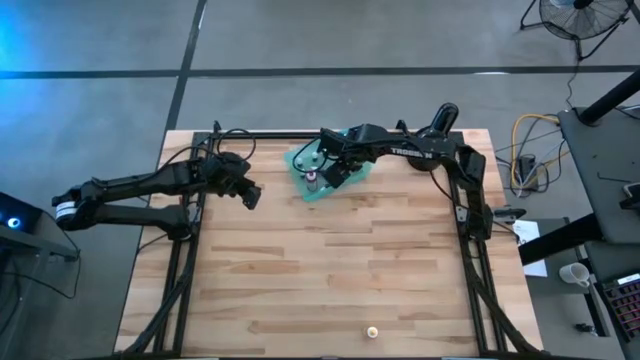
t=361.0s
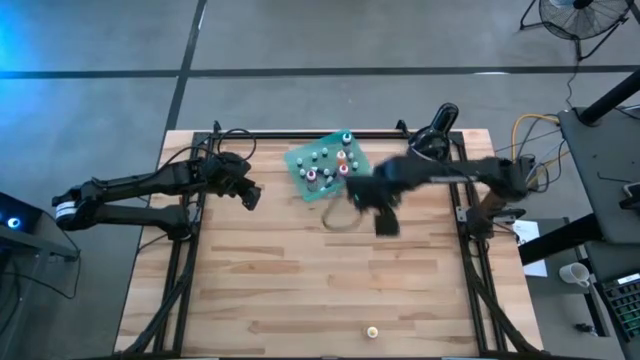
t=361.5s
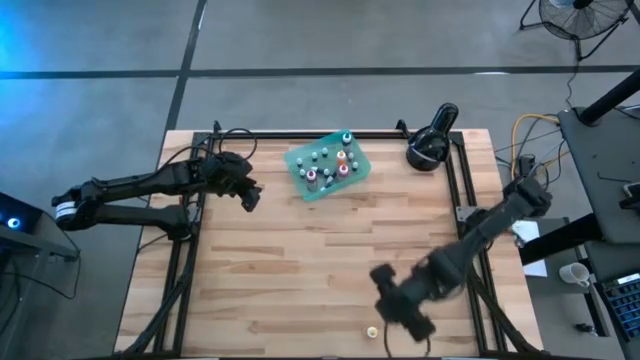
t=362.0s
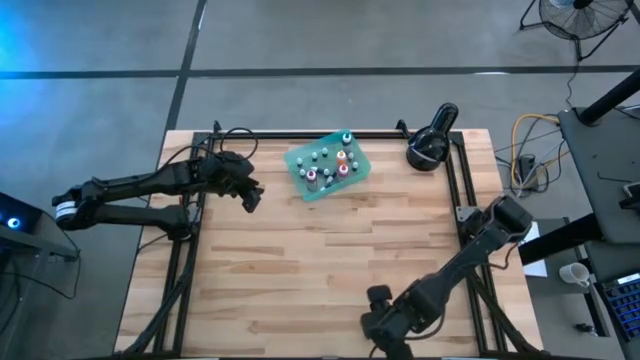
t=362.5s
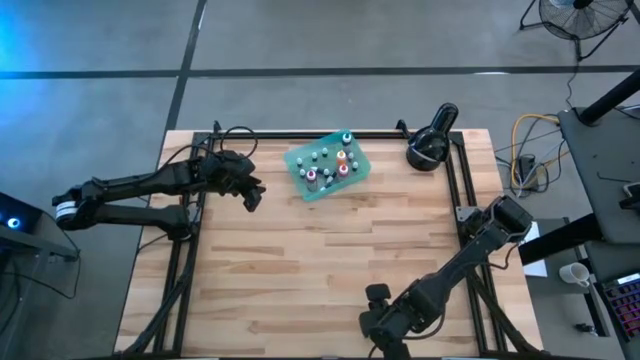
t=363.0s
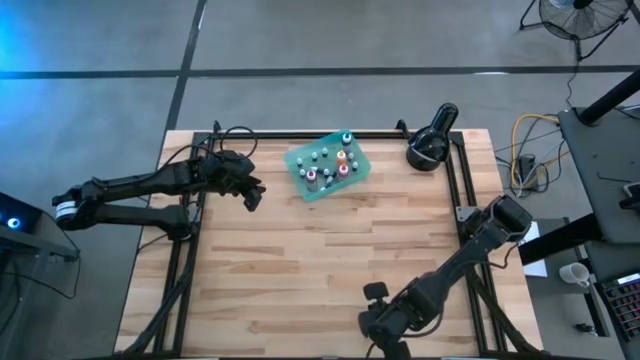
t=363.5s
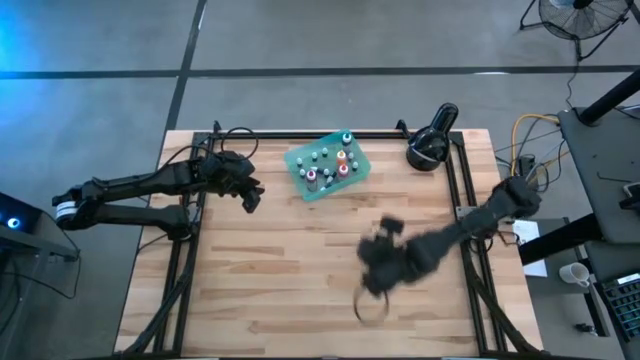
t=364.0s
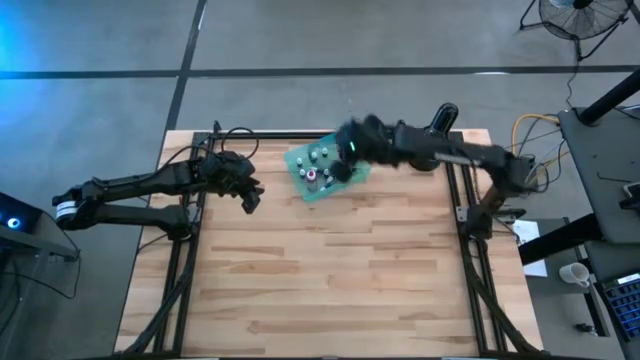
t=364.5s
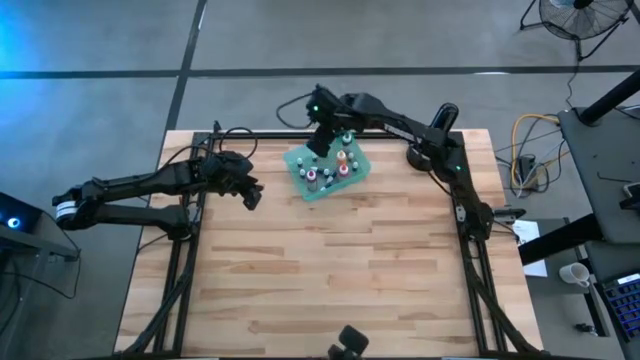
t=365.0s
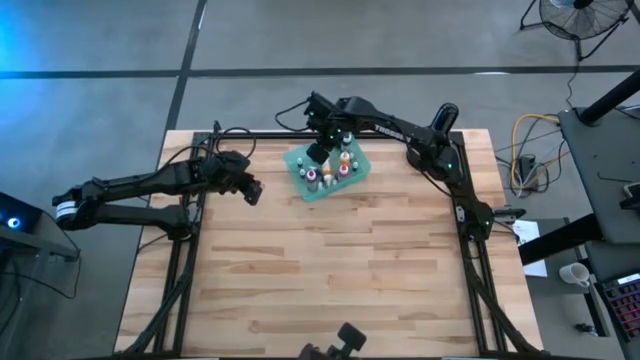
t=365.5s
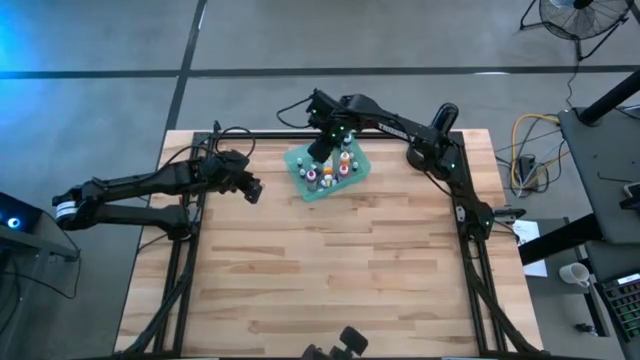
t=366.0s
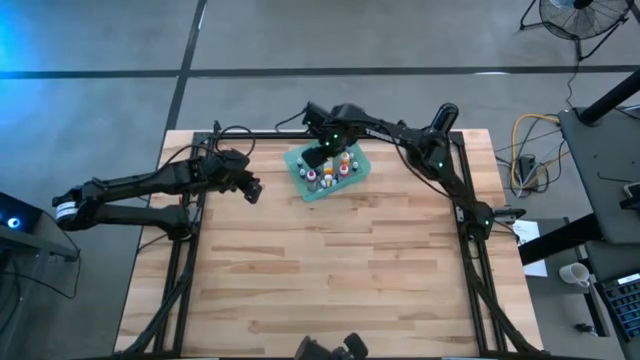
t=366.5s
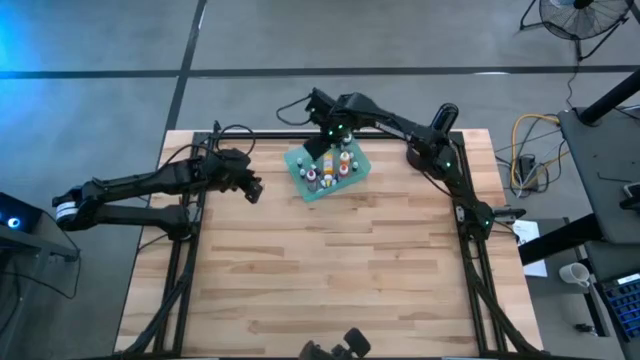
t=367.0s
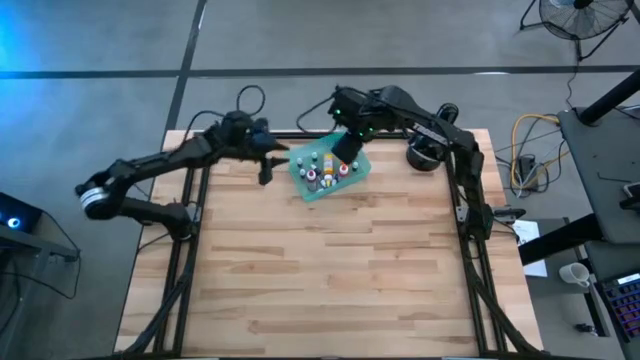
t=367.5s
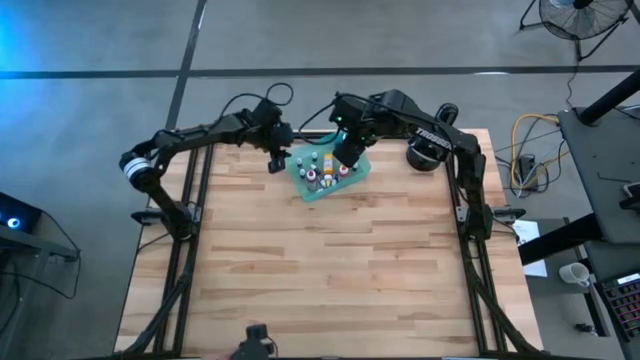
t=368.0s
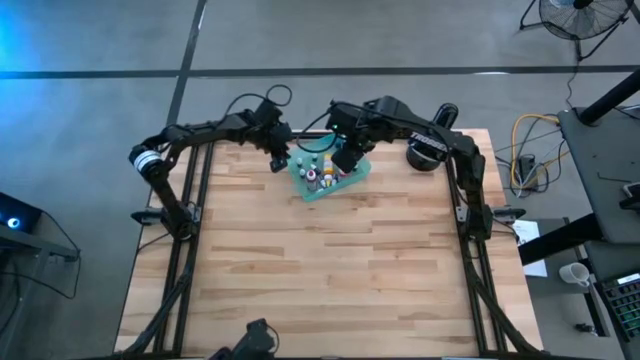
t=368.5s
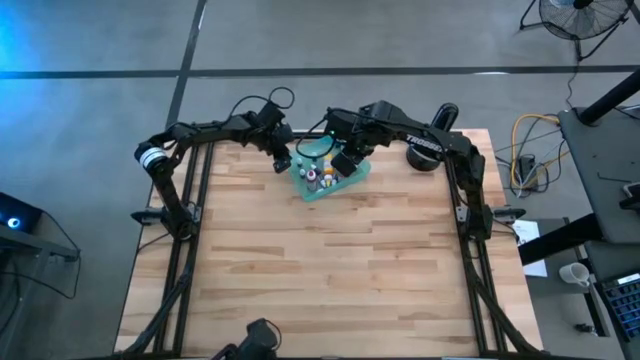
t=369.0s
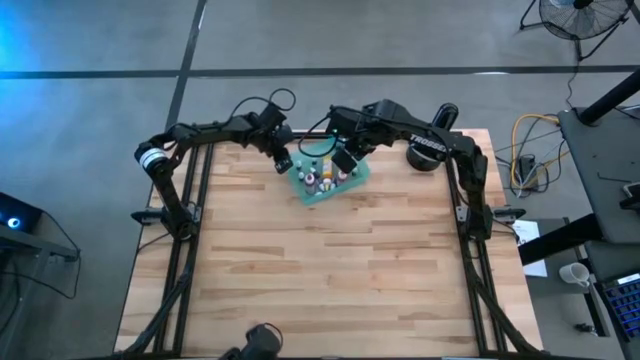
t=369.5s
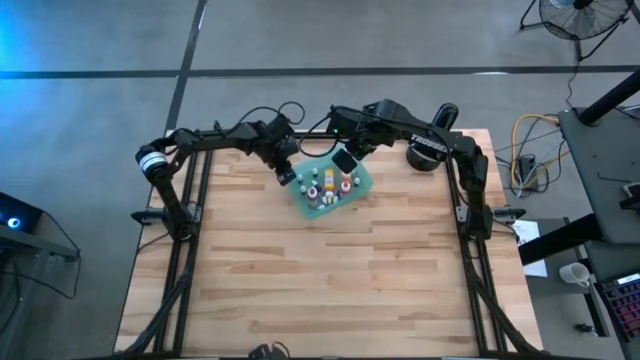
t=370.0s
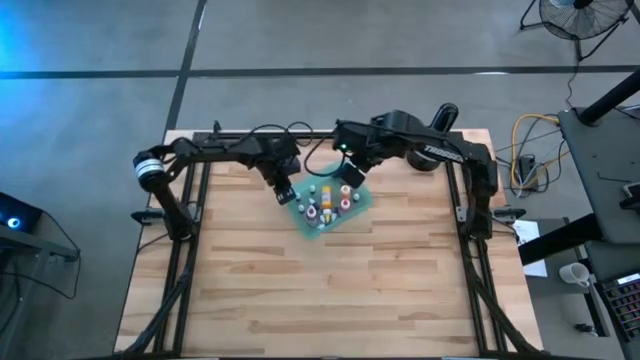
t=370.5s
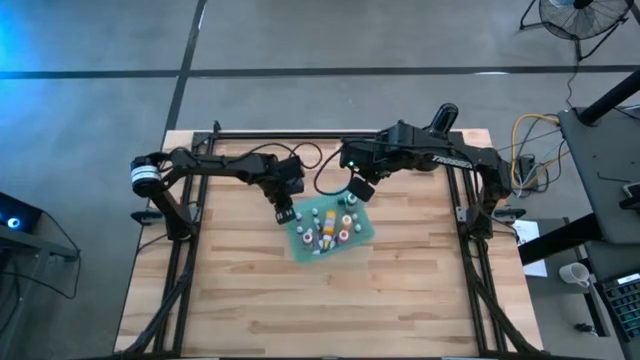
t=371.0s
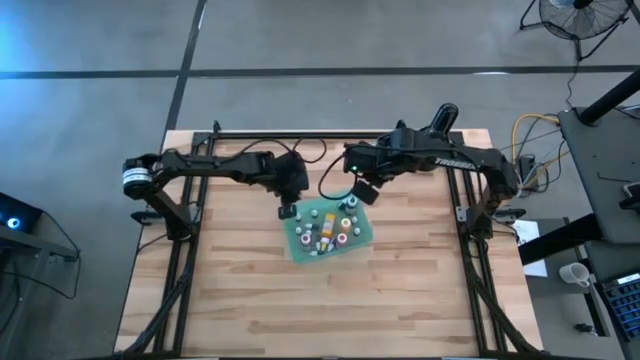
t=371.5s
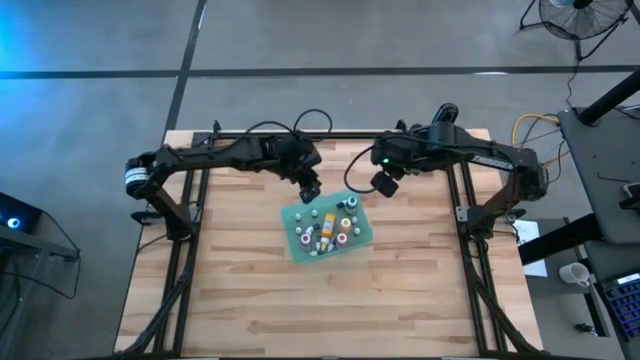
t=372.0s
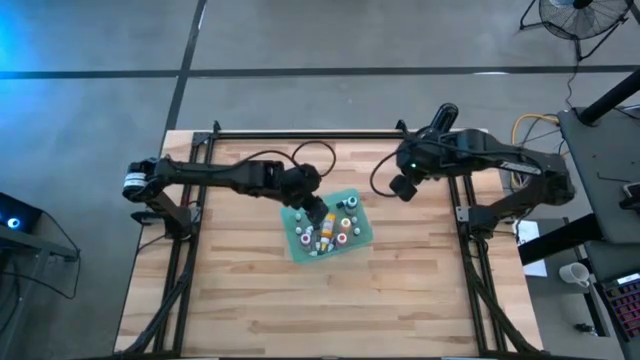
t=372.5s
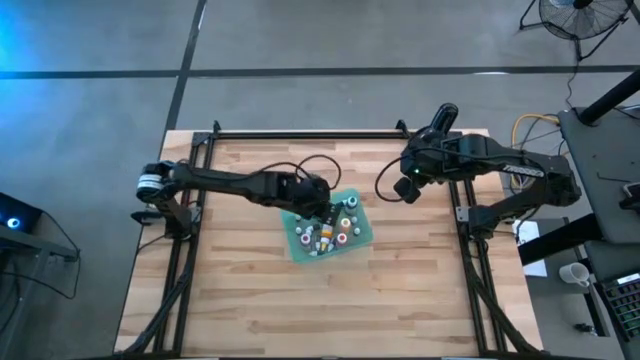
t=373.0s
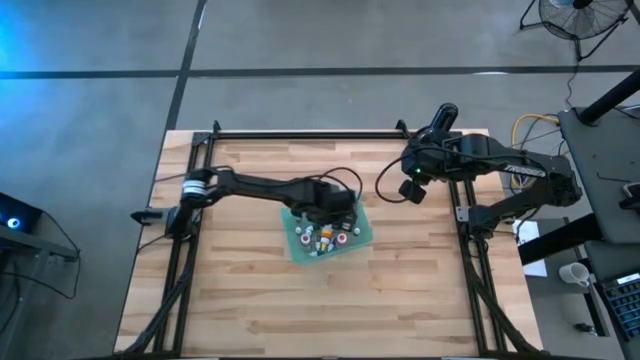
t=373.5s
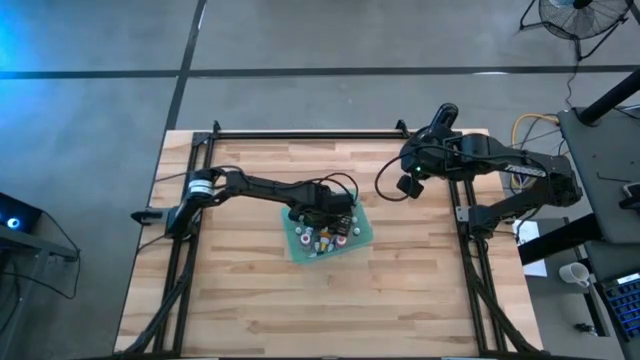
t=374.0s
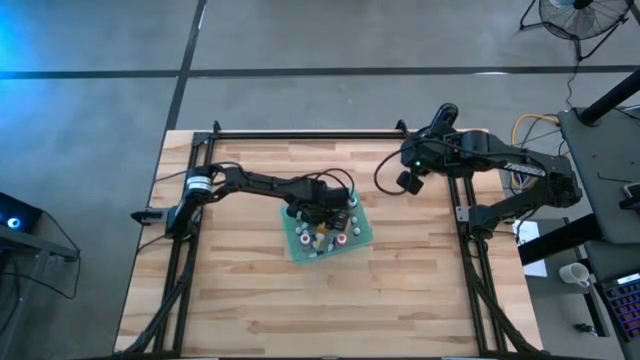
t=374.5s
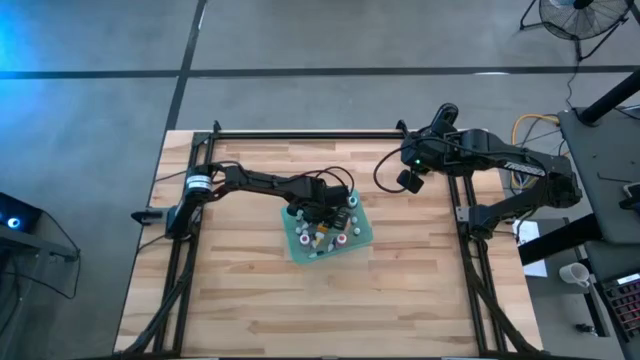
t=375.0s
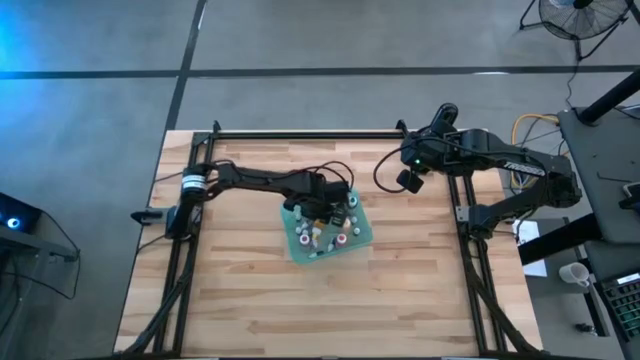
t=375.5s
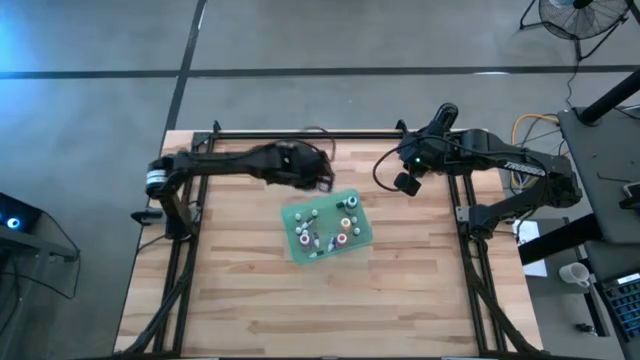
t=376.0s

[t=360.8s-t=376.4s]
Task: Pick & Place food coloring
Put the orange big food coloring into the green bin

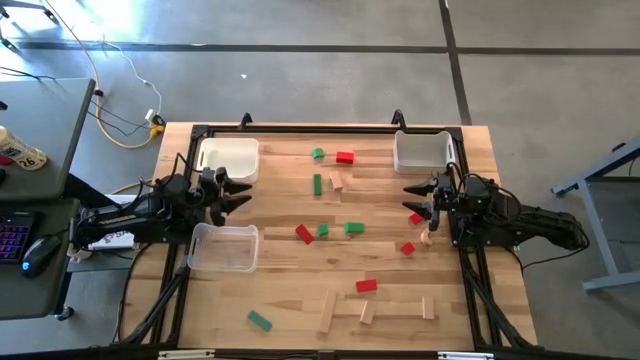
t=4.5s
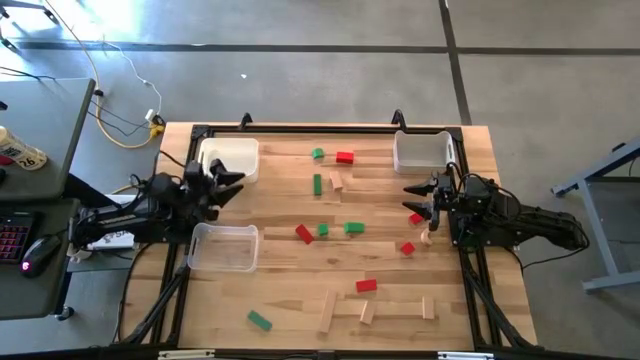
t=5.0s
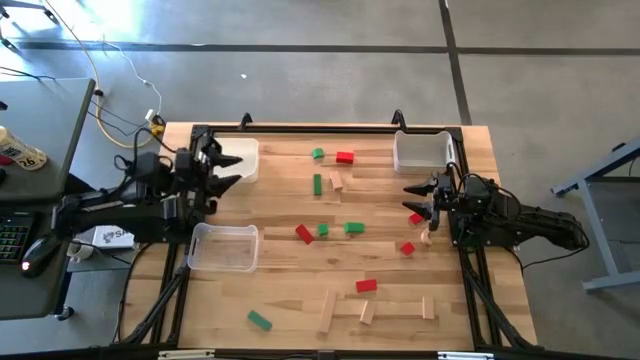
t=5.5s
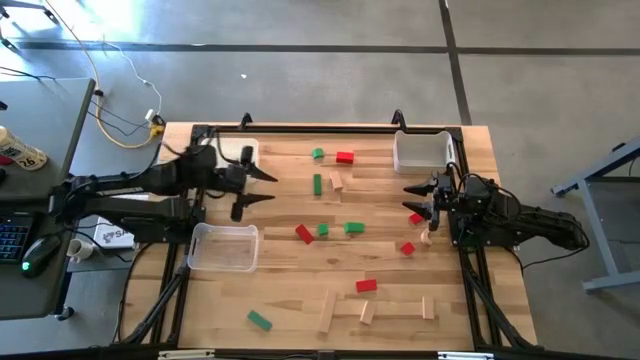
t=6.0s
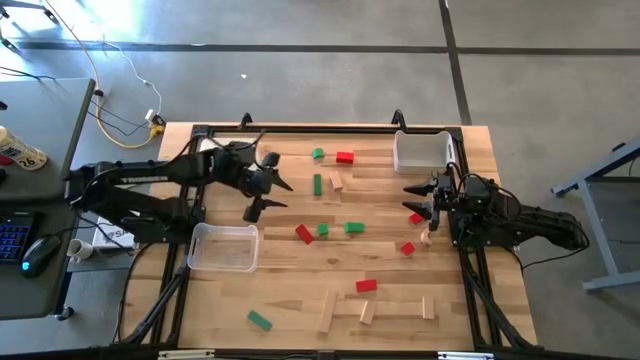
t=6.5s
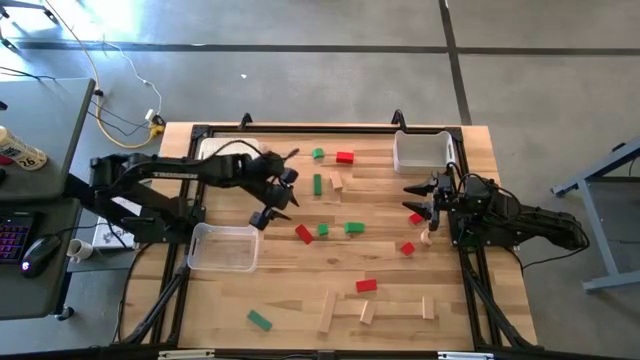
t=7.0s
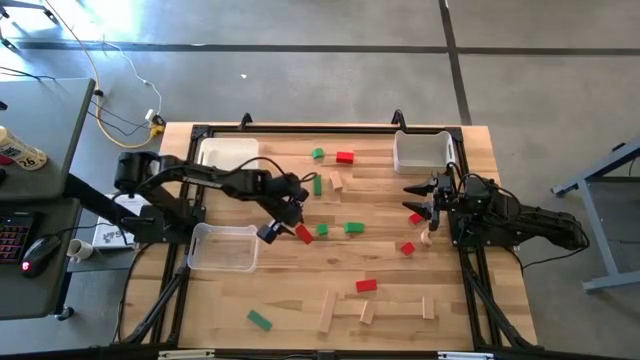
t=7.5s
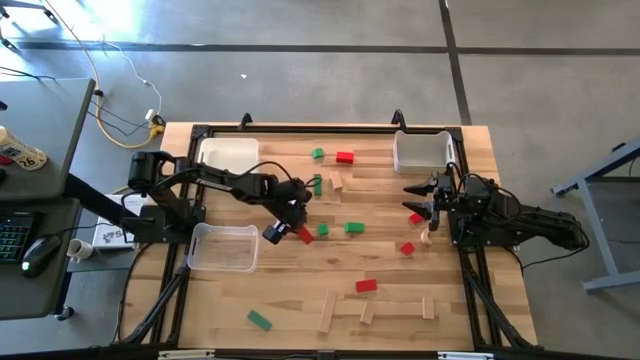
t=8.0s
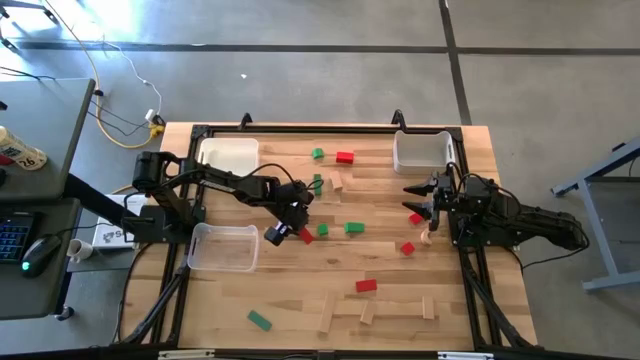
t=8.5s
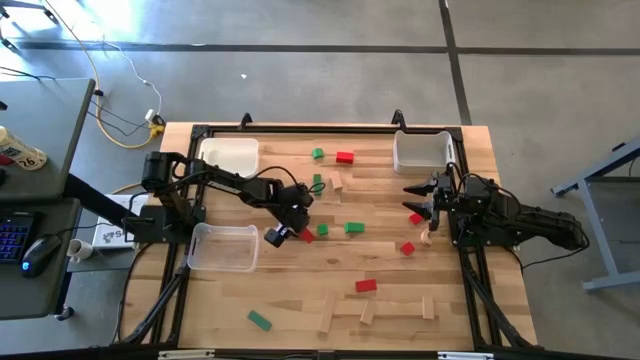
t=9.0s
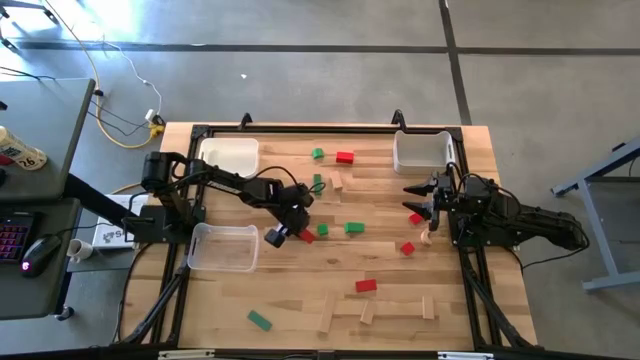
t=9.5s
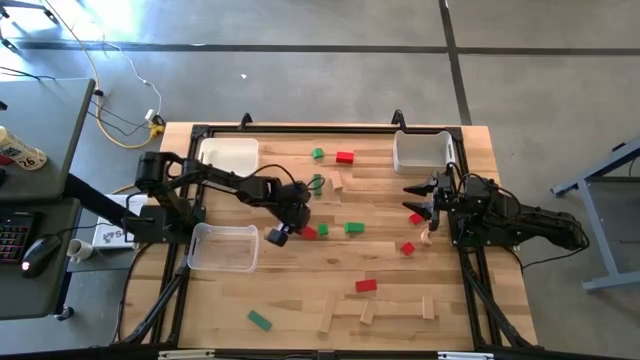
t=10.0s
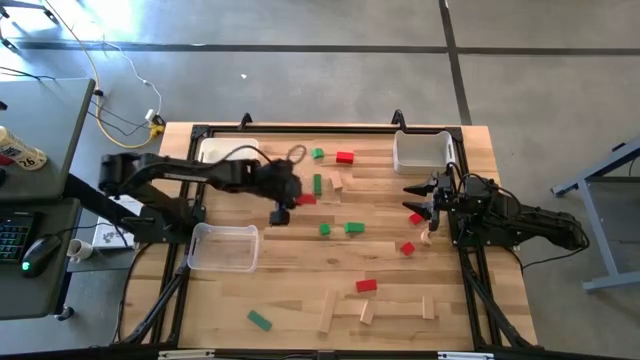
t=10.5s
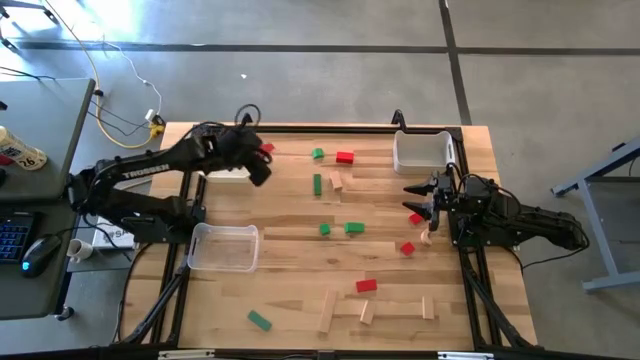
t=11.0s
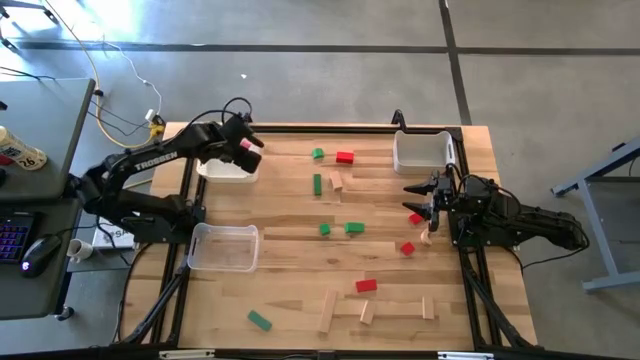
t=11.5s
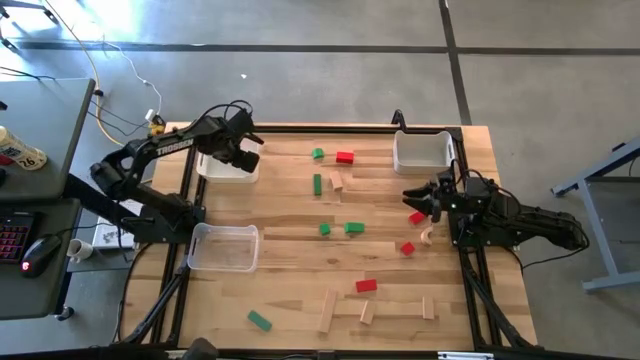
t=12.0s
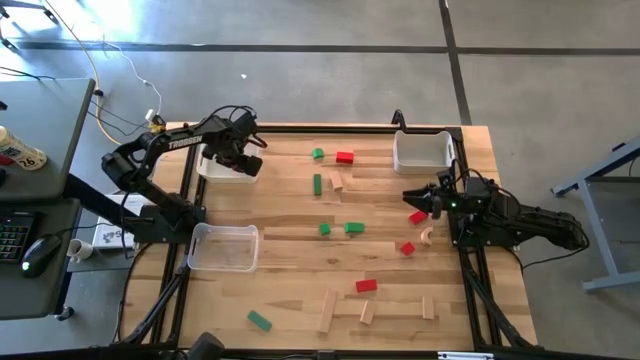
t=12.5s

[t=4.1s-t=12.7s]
Task: Sort & place blocks by color
Put the red rectangle into the left white bin
